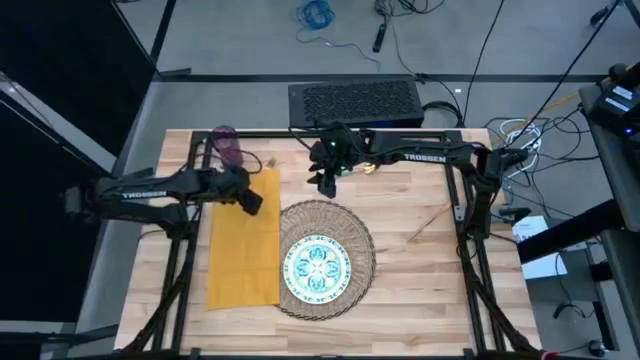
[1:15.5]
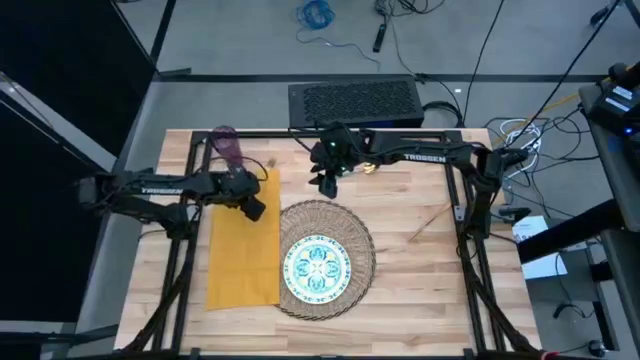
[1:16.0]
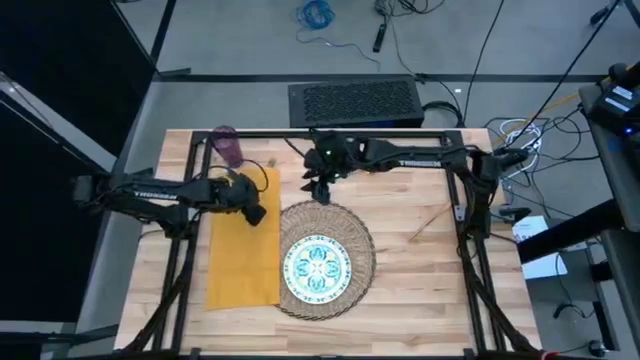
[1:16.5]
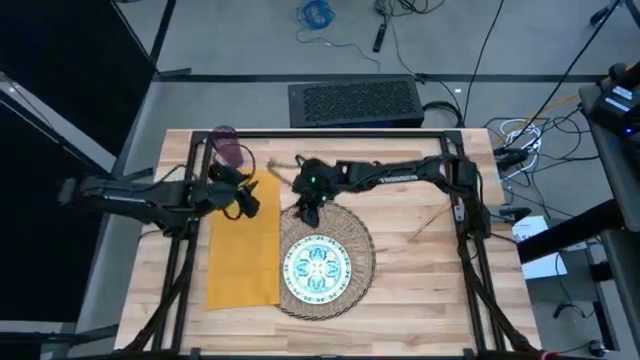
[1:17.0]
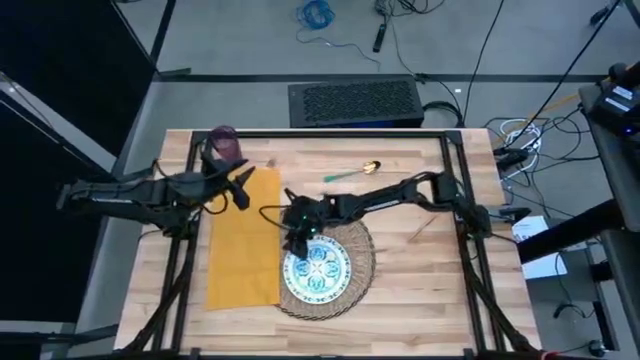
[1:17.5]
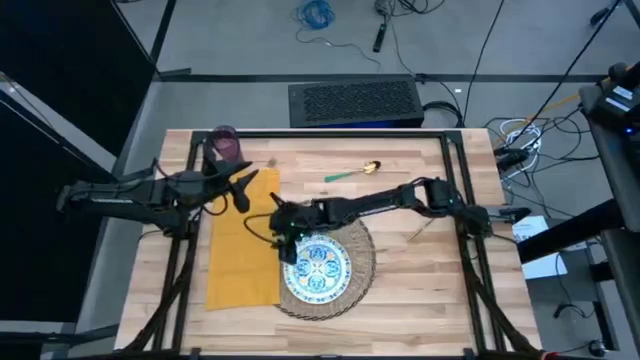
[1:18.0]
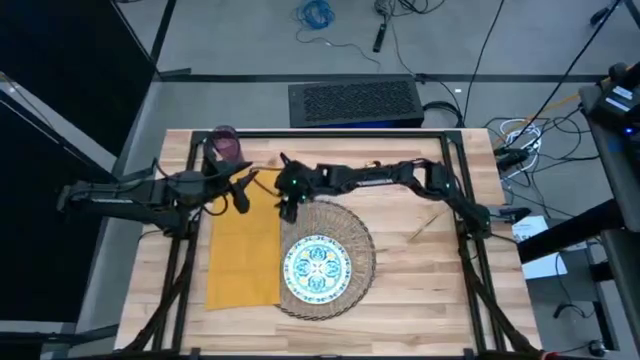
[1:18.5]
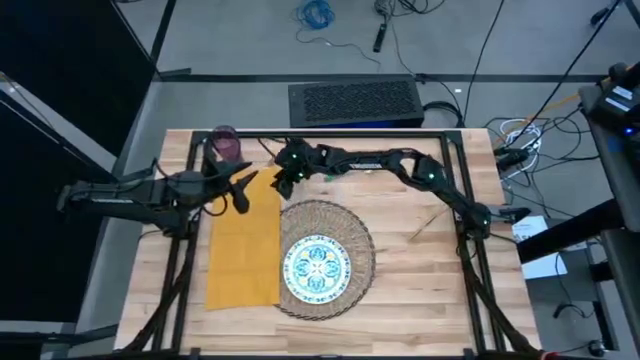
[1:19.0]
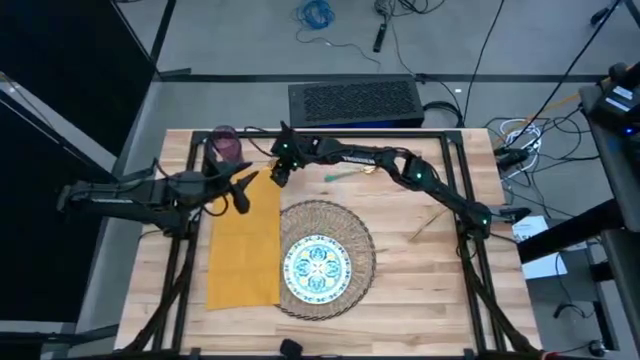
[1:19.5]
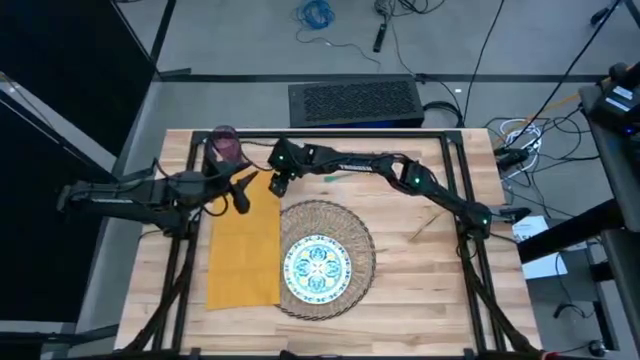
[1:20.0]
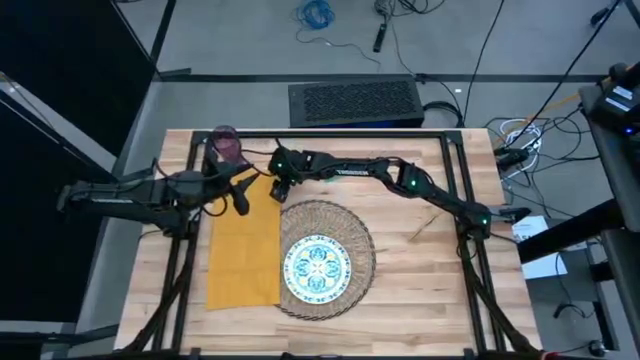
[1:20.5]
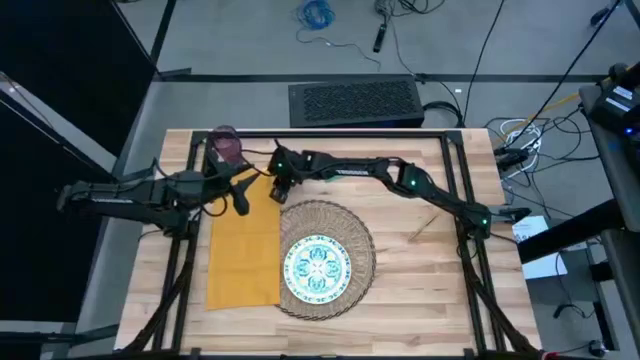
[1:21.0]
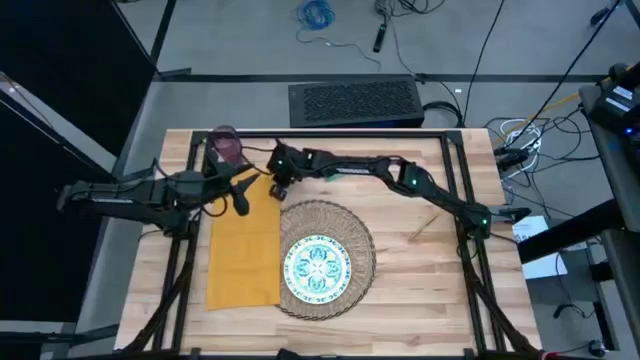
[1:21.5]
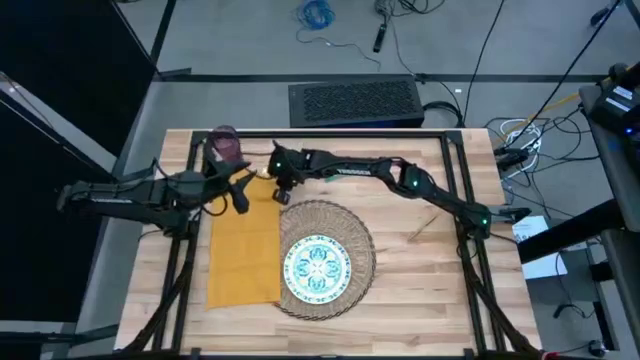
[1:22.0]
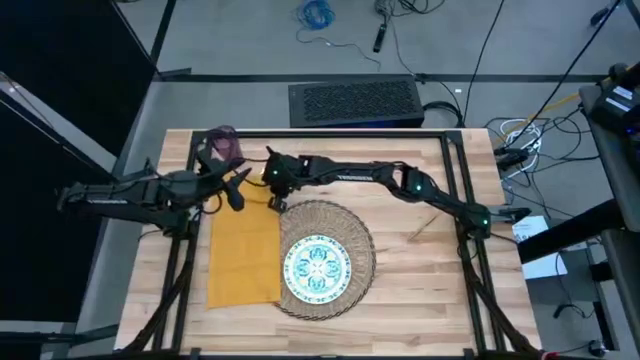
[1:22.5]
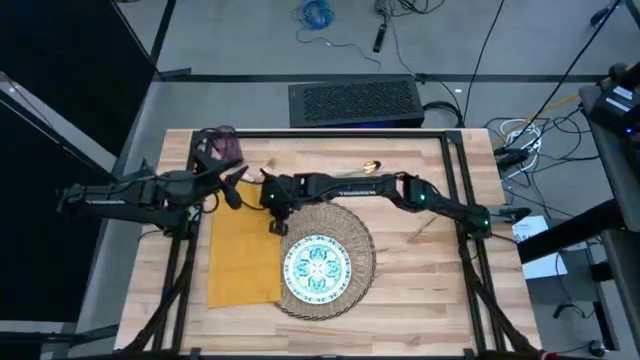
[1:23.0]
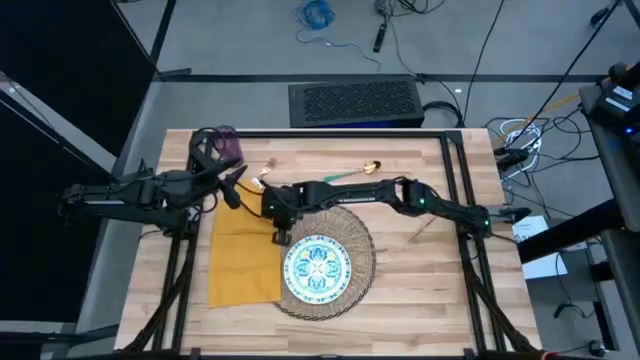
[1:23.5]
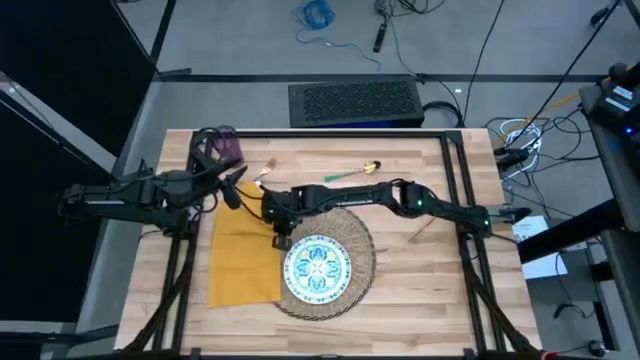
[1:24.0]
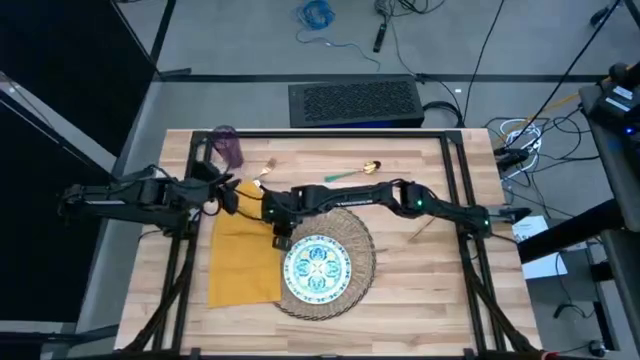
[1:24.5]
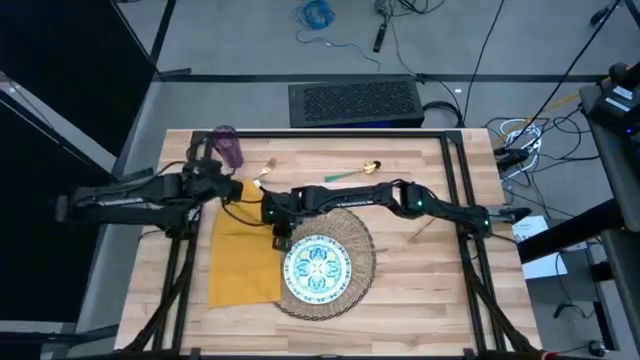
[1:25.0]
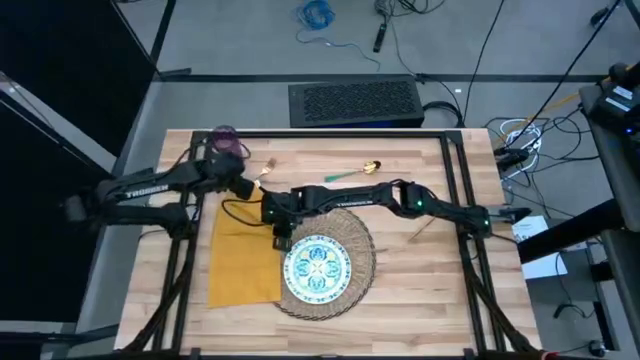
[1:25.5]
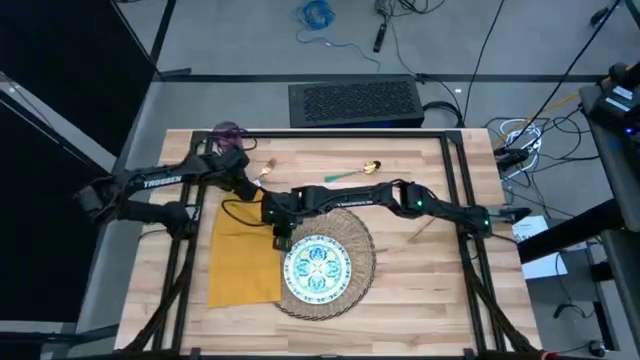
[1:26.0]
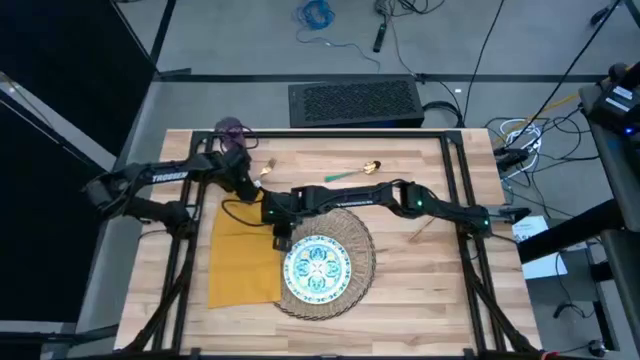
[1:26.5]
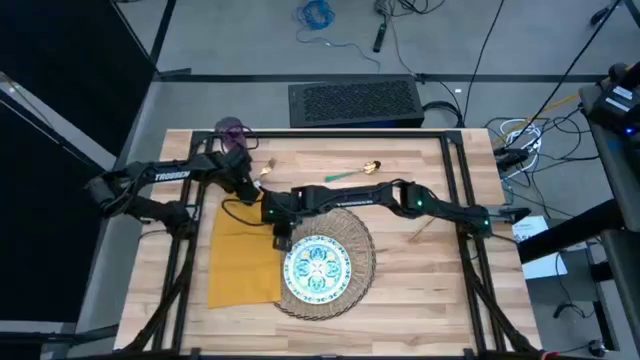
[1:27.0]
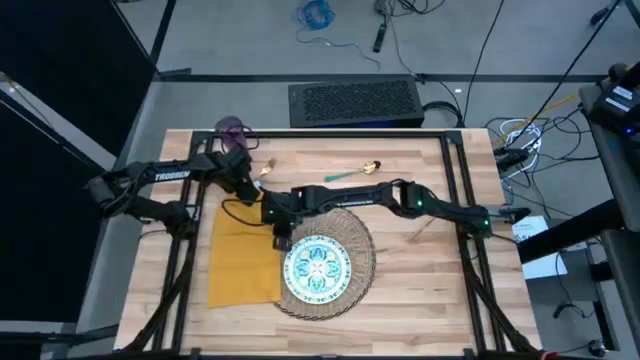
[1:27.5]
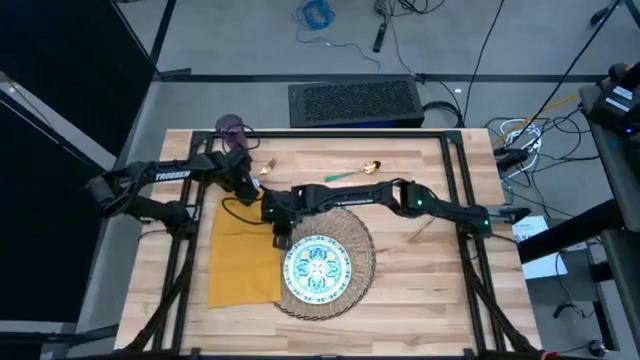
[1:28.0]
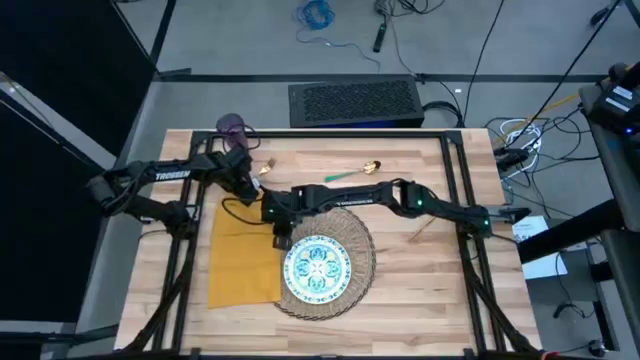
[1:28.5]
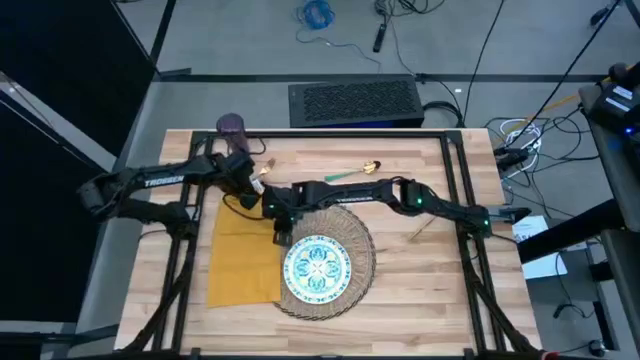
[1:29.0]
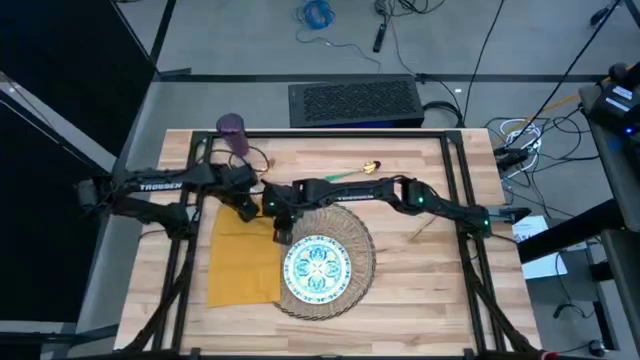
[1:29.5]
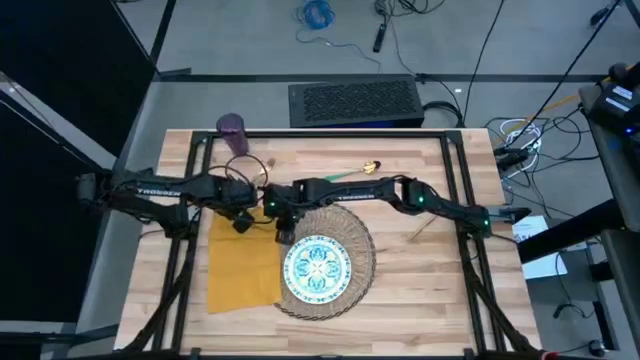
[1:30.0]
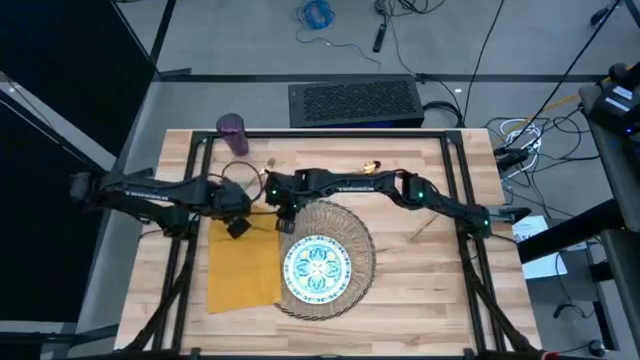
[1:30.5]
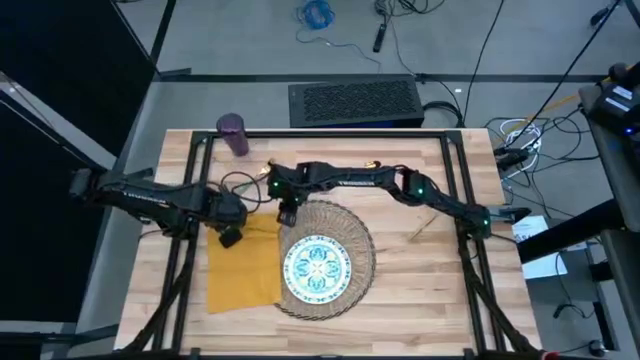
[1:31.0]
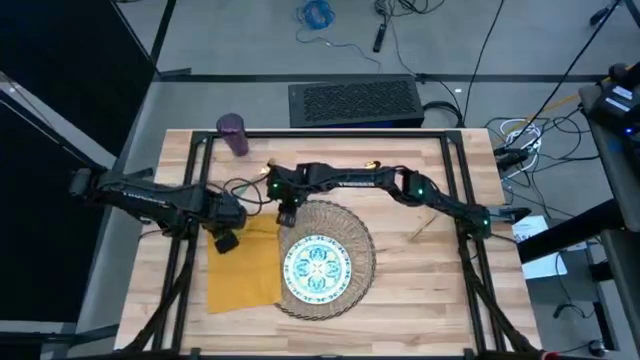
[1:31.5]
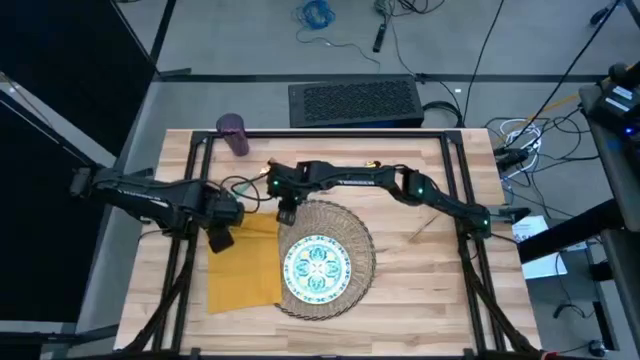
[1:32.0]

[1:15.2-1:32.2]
Task: Set table place
Fold the yellow table napkin

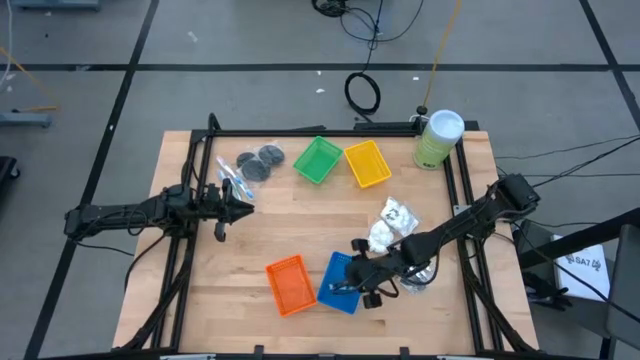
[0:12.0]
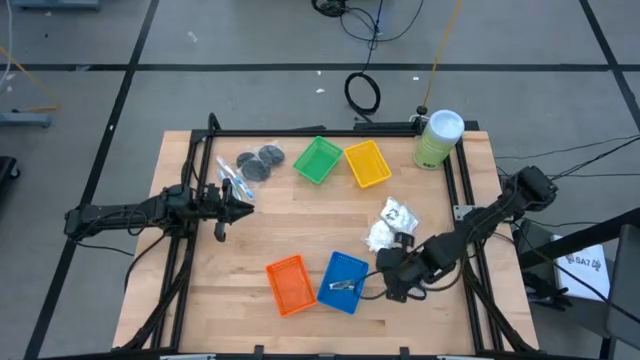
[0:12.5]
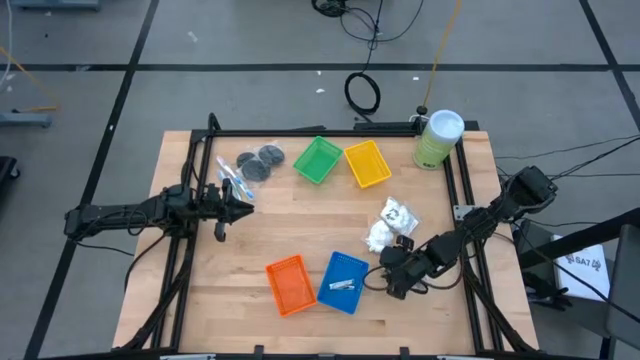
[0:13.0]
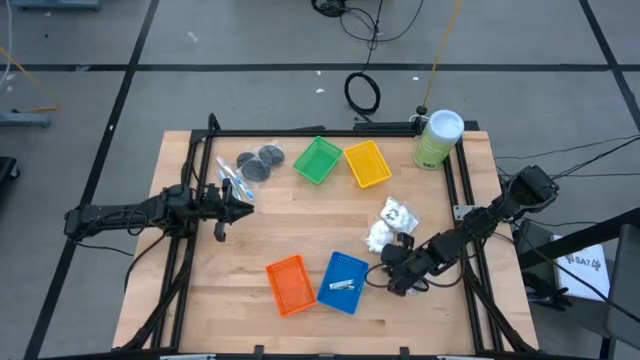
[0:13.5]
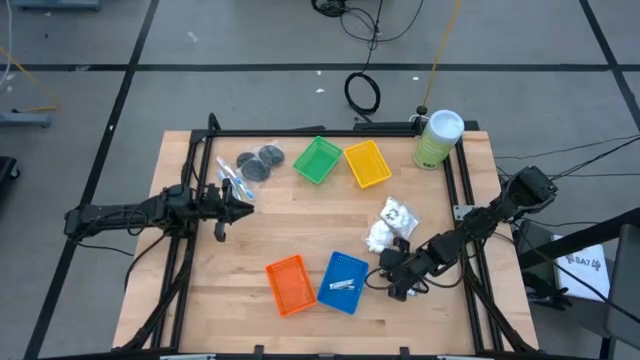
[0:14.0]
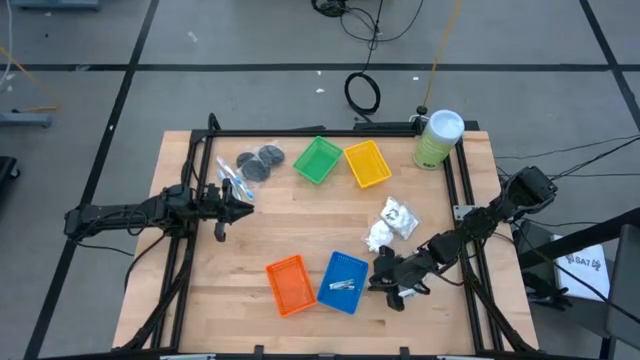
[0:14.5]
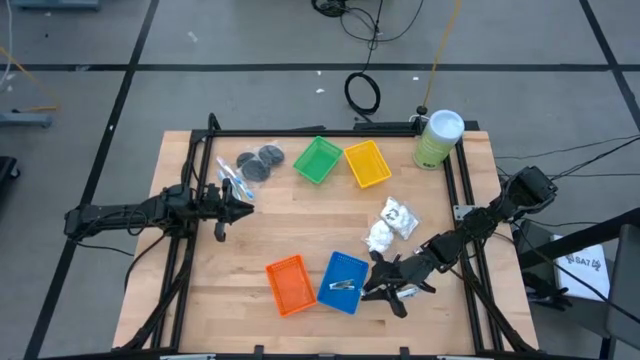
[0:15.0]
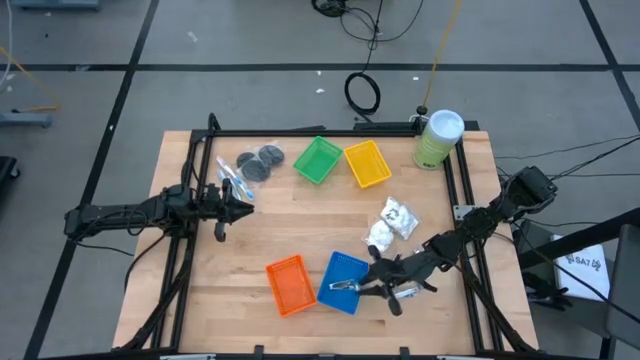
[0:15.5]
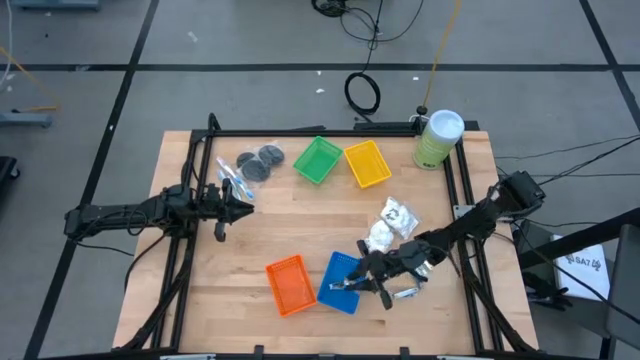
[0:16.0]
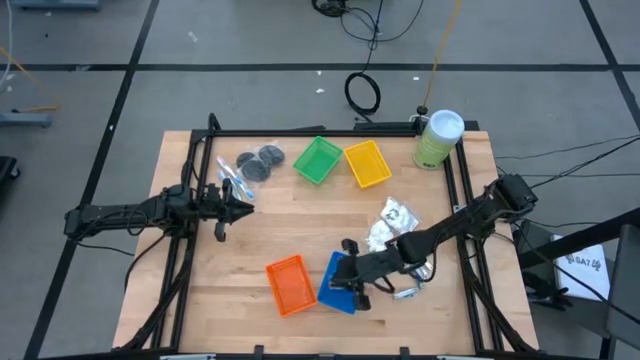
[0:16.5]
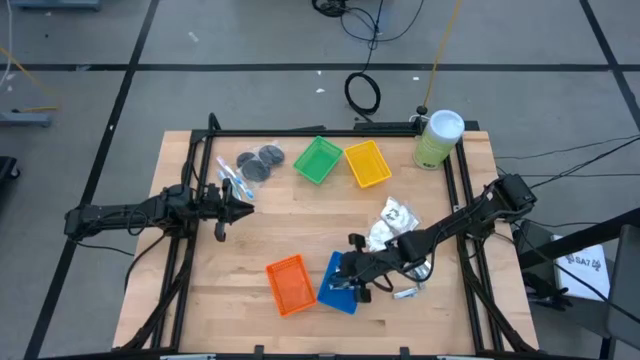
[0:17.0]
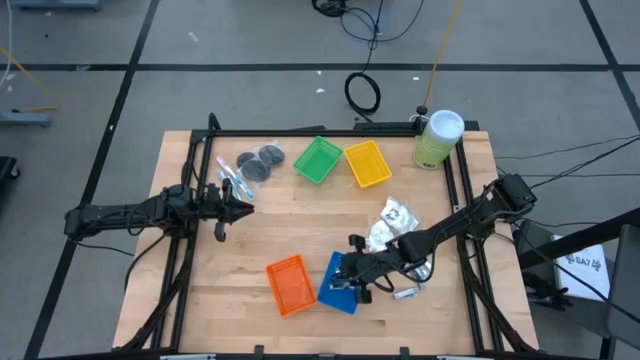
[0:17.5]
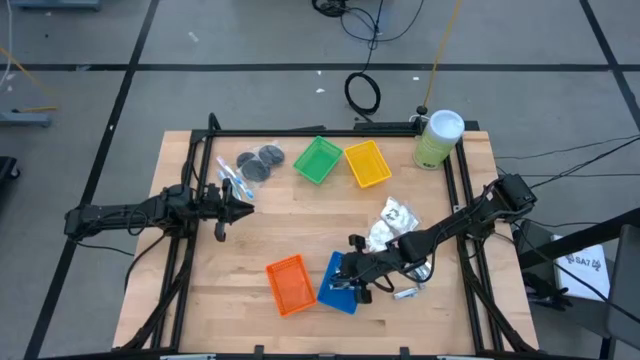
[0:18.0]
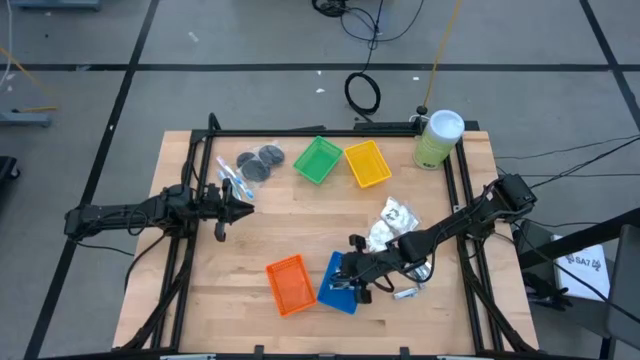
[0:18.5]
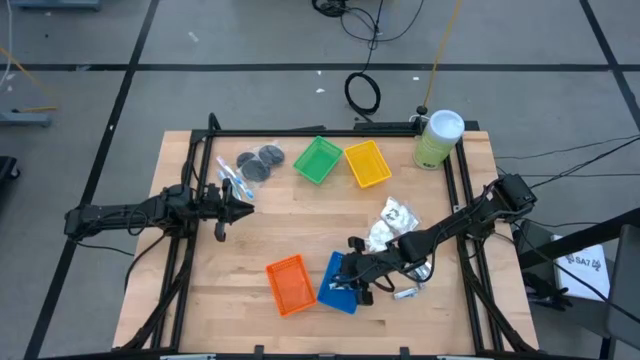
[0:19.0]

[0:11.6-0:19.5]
Task: Pick & Place Travel size toiletries
Put the silver nail cutter into the blue bin
